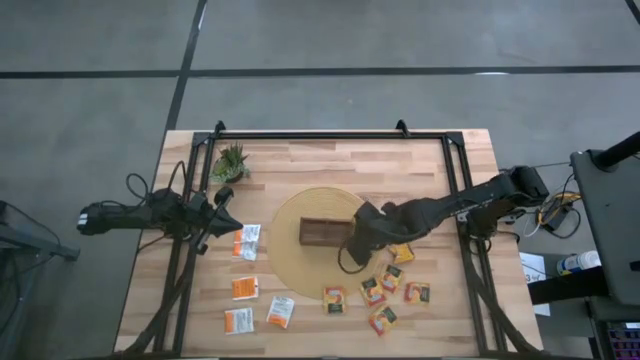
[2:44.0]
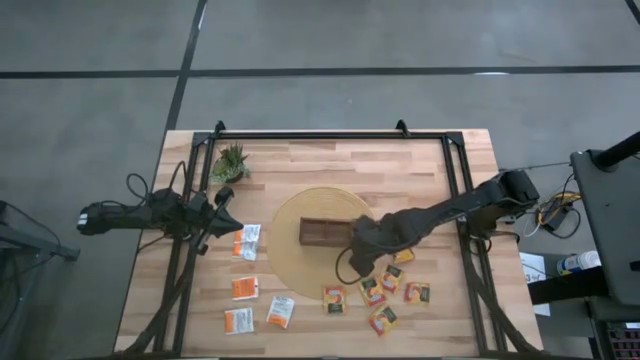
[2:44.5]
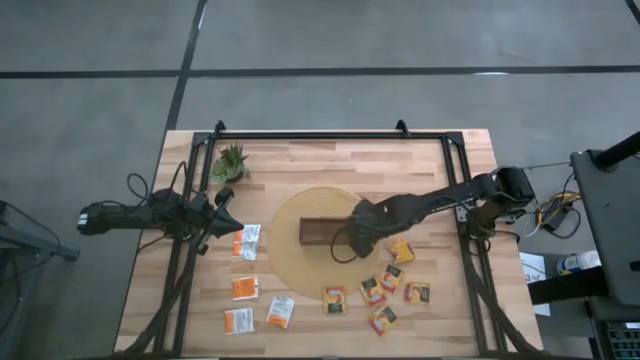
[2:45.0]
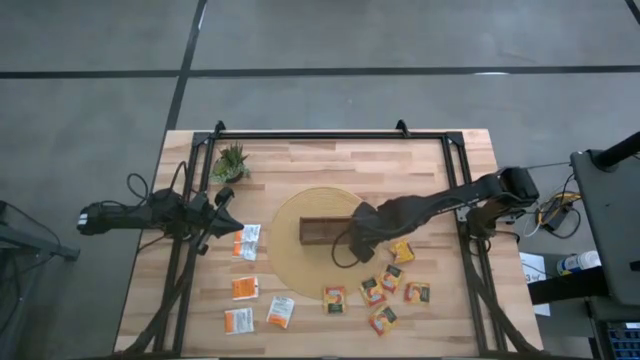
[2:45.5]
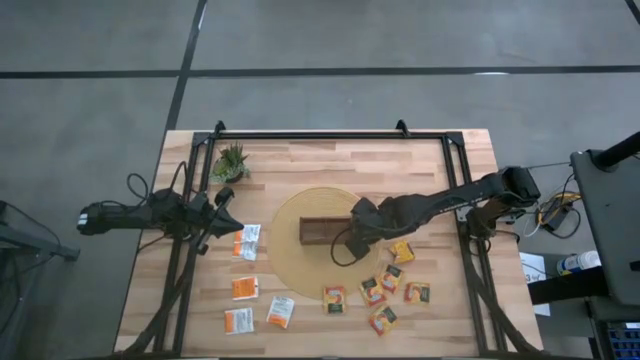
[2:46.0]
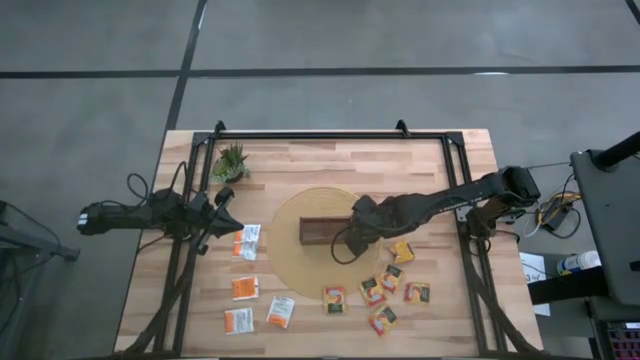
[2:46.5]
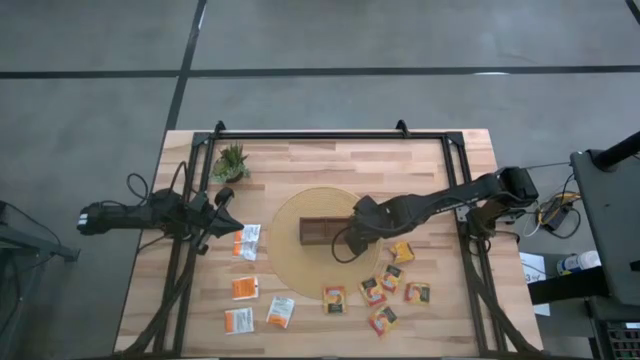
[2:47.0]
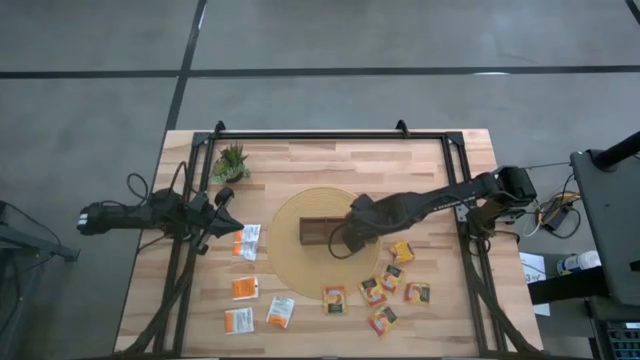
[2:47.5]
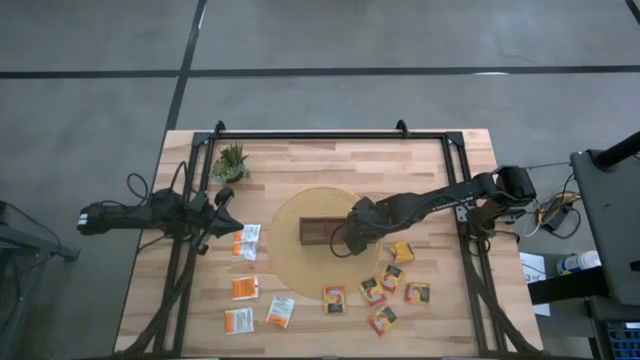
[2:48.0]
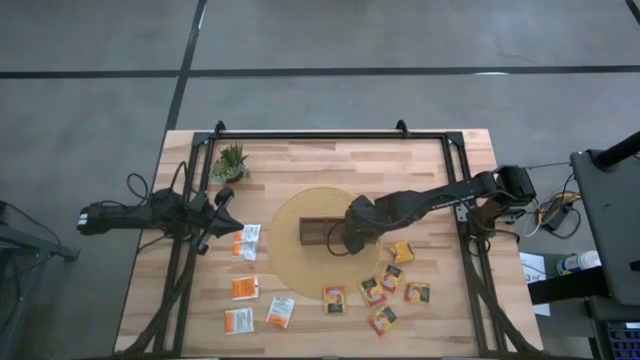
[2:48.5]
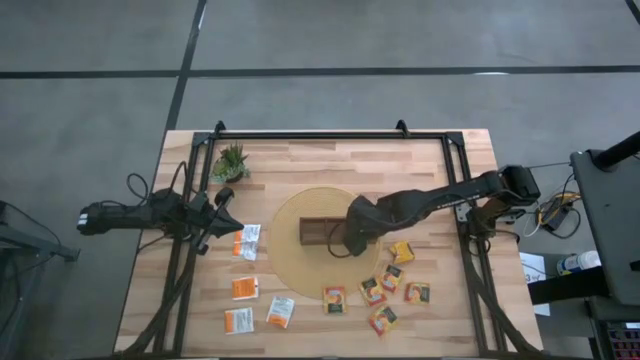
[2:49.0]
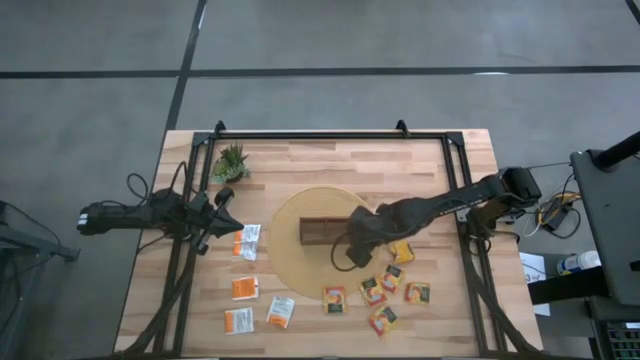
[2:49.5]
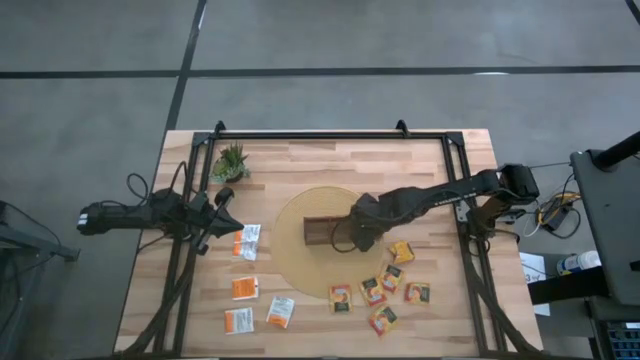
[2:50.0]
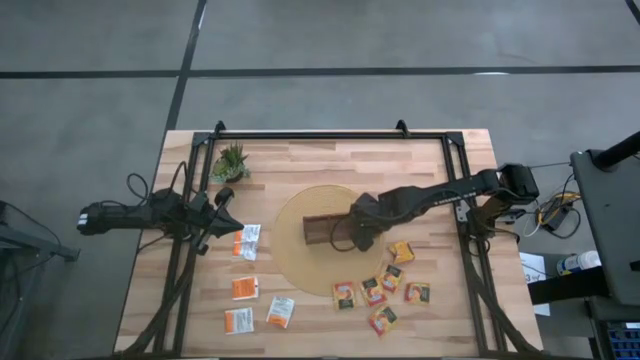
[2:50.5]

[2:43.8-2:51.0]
Task: Pick & Place Tea
Adjust the yellow tea bags in the wooden organizer

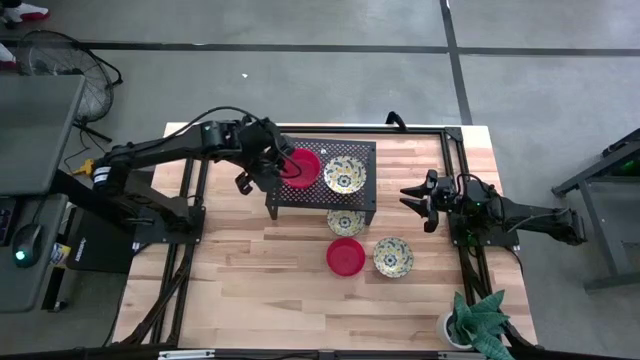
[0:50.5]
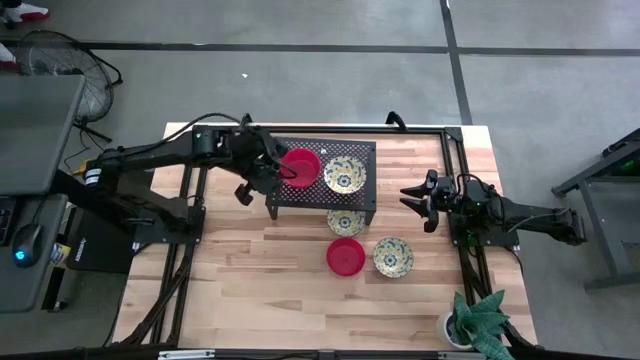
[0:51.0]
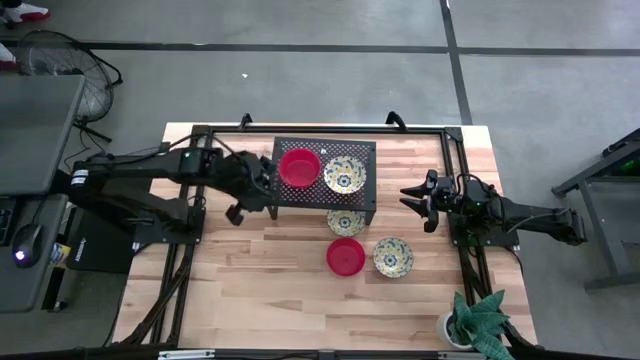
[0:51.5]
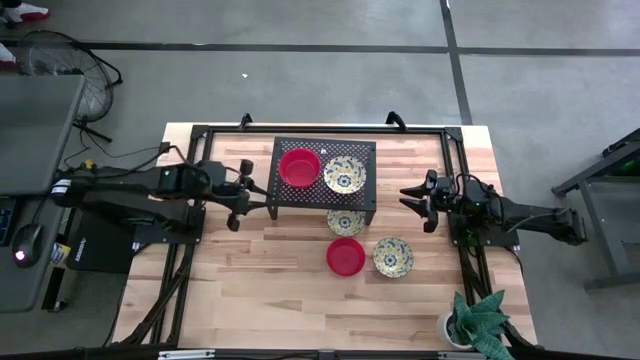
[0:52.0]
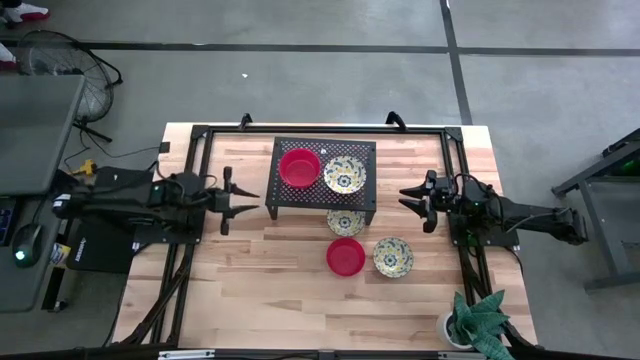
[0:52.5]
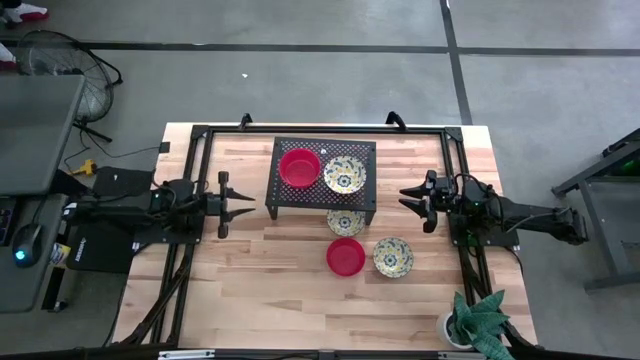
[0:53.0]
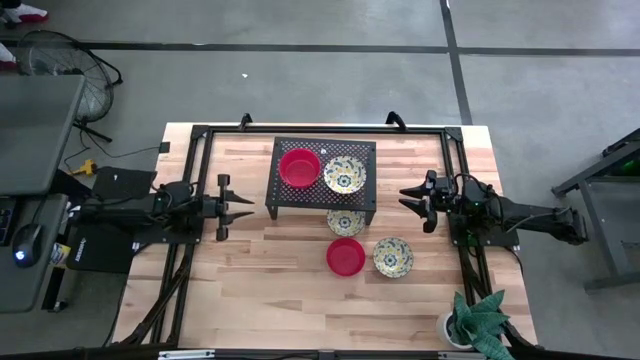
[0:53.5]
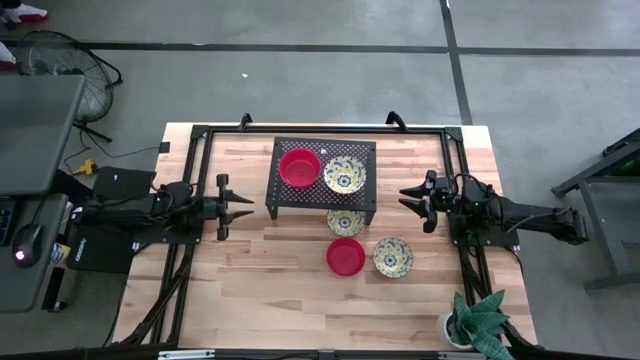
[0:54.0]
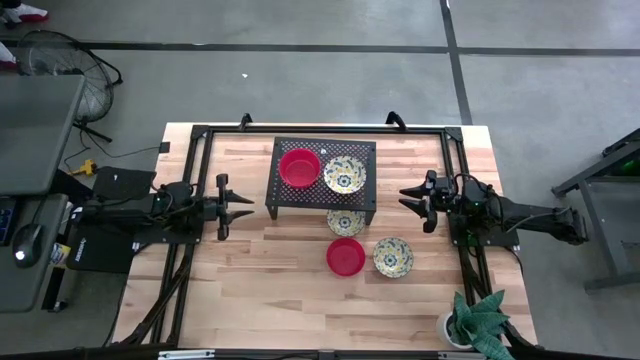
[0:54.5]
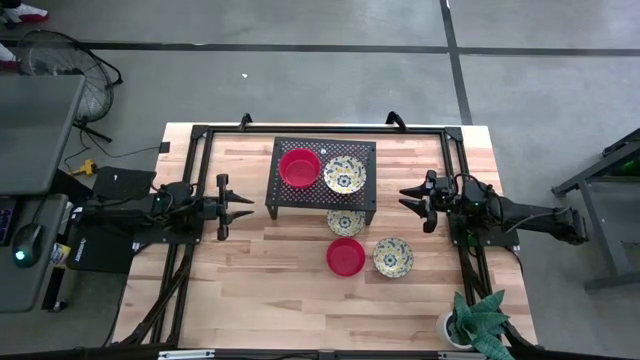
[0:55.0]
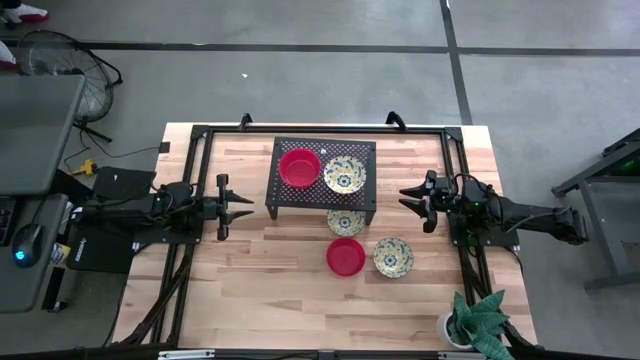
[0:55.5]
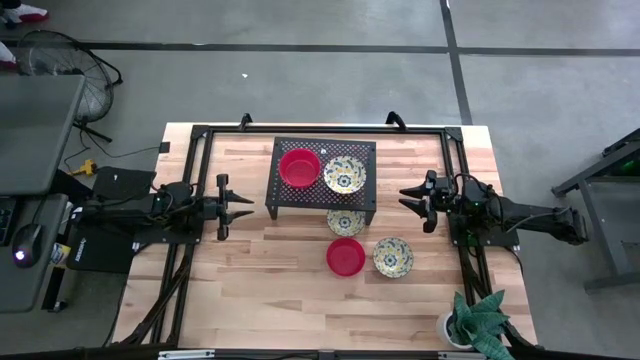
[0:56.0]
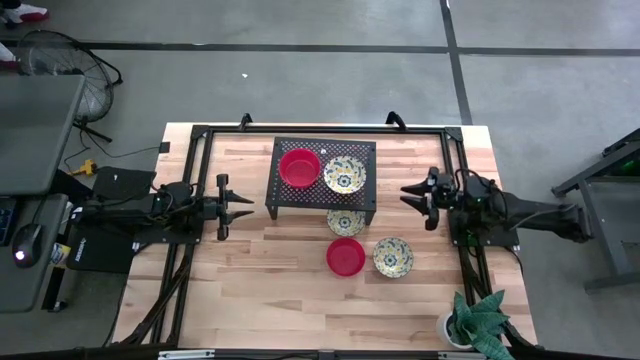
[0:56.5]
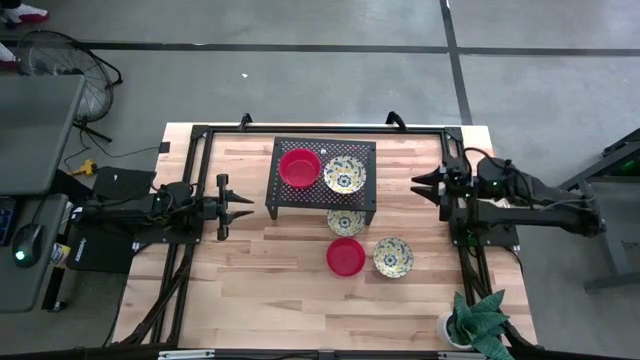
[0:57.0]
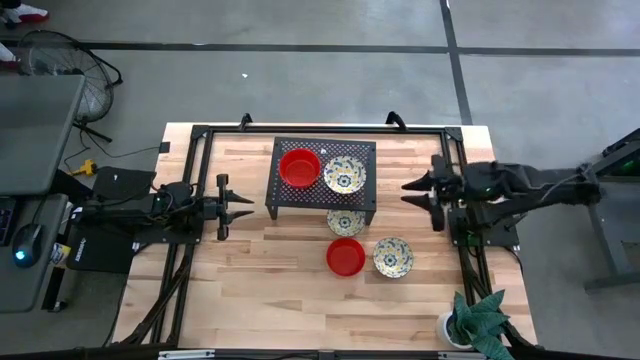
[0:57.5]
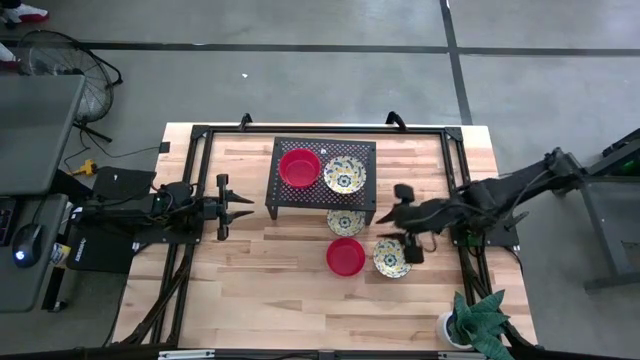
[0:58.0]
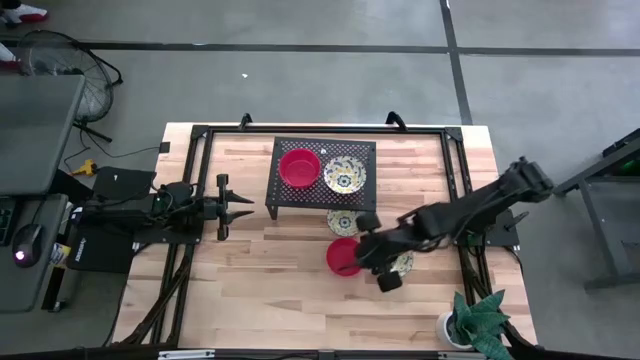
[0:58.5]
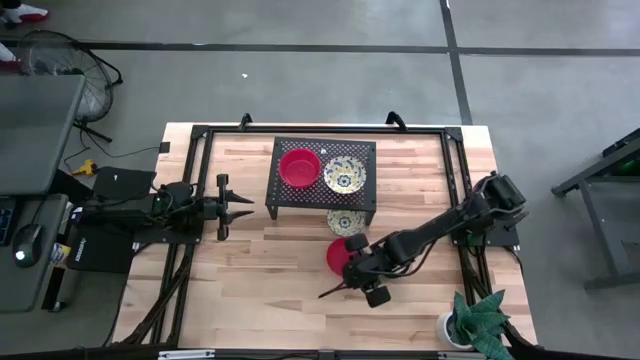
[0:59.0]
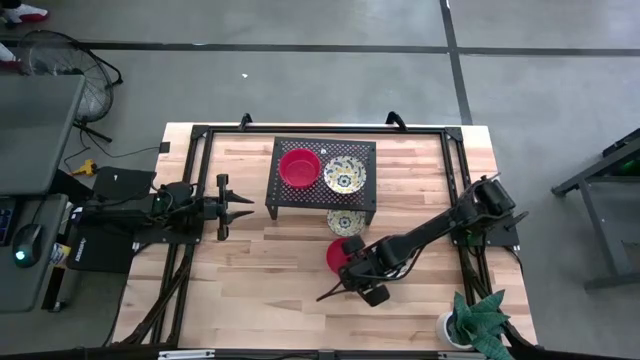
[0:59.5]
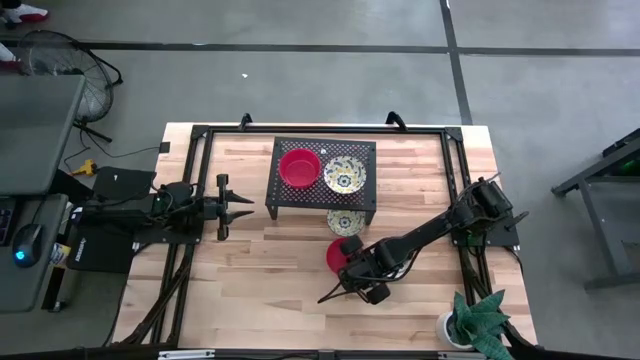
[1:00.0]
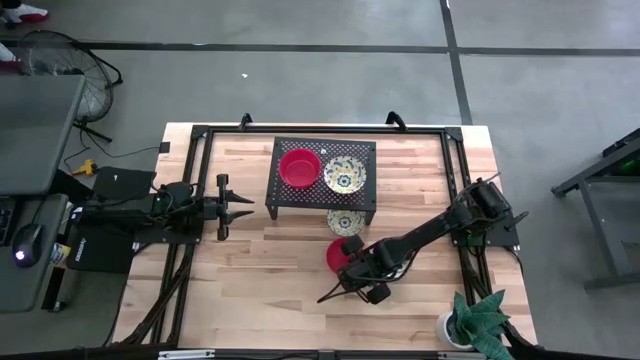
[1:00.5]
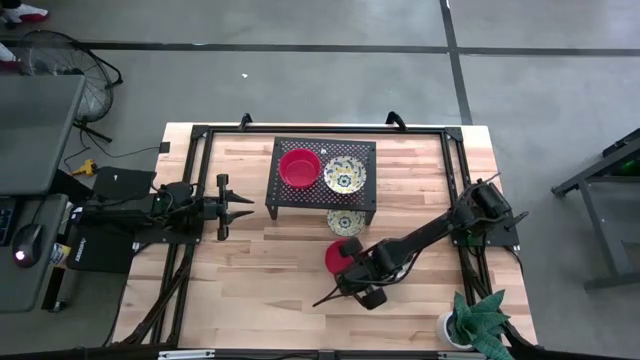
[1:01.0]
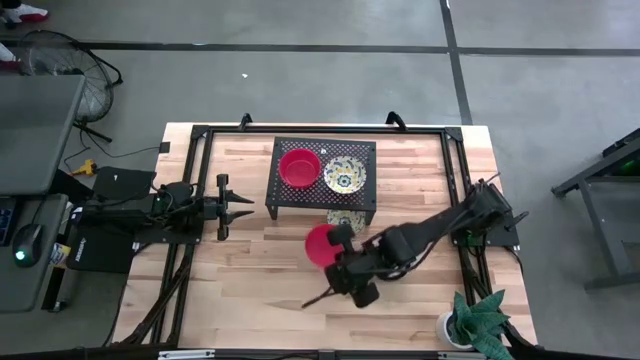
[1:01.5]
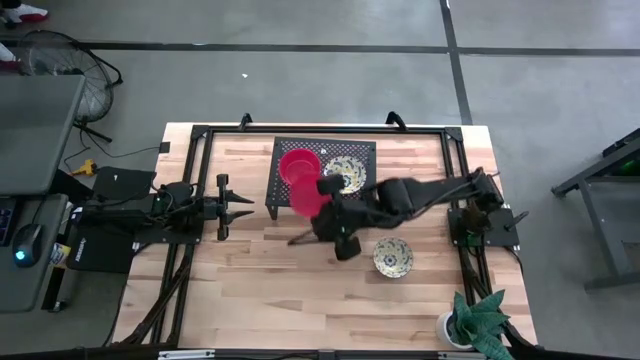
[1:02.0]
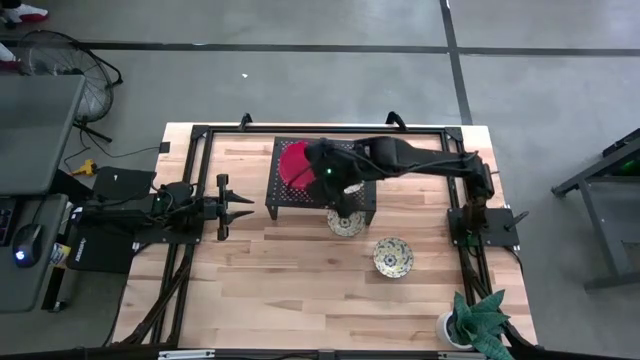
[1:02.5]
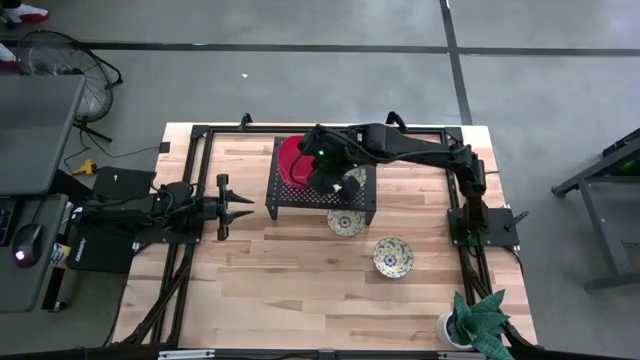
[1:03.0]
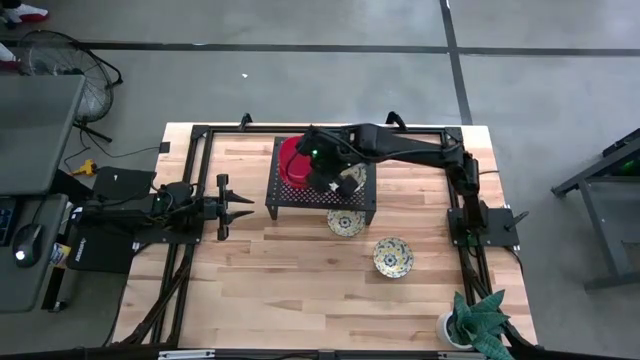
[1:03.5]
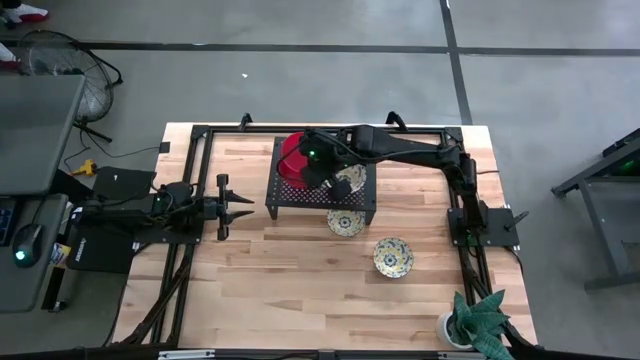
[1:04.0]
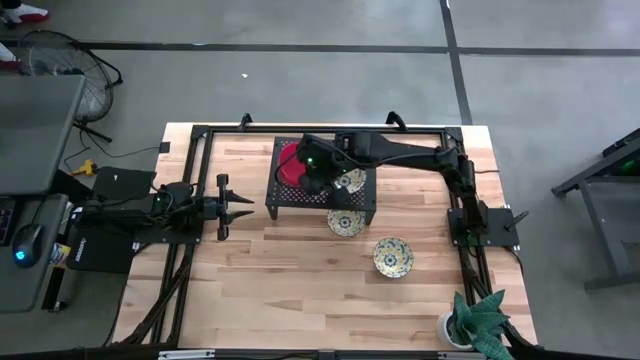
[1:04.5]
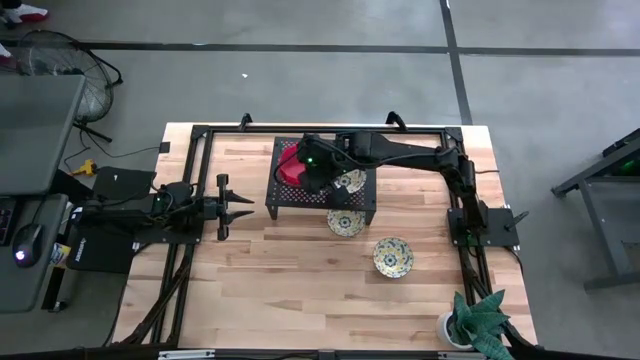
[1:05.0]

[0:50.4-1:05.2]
Task: Pick & Place Mini bowls
Stack the red bowl on the red bowls on the shelf
